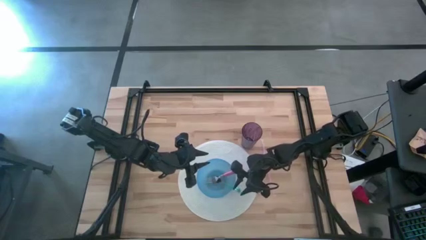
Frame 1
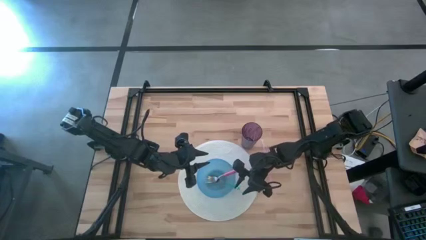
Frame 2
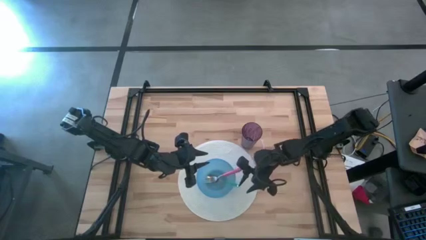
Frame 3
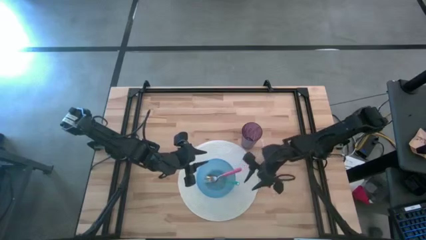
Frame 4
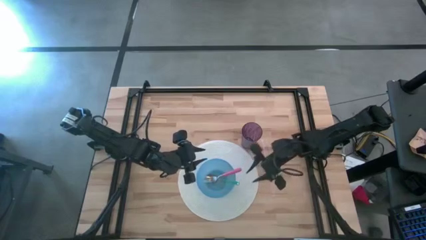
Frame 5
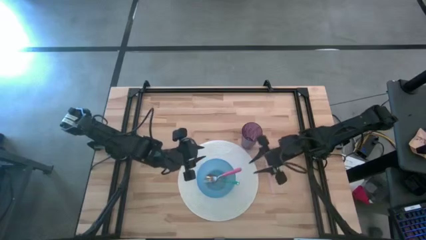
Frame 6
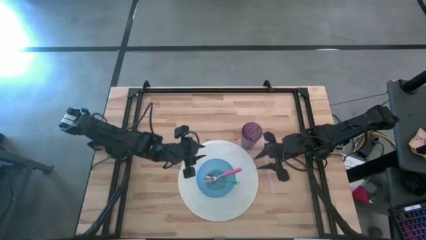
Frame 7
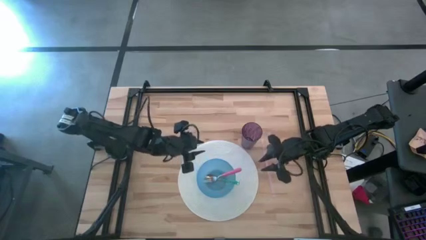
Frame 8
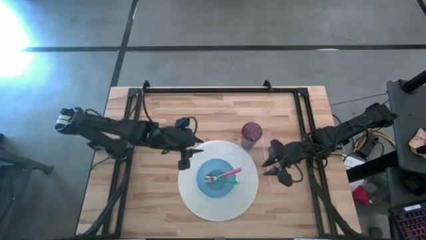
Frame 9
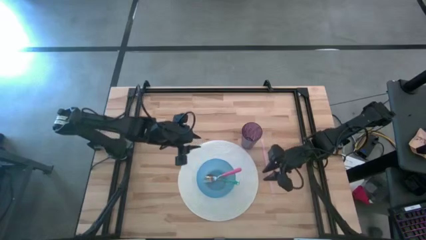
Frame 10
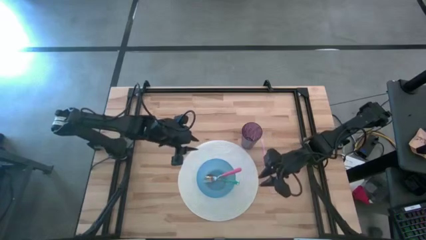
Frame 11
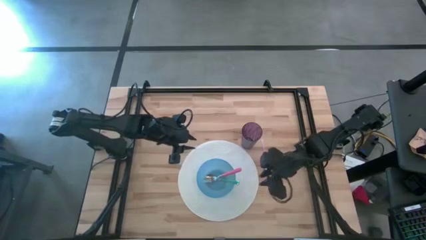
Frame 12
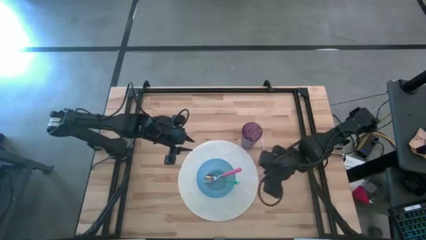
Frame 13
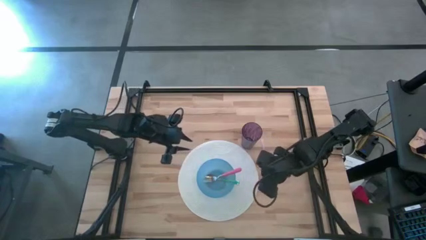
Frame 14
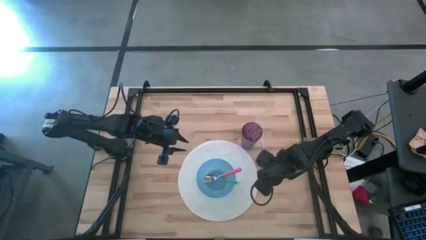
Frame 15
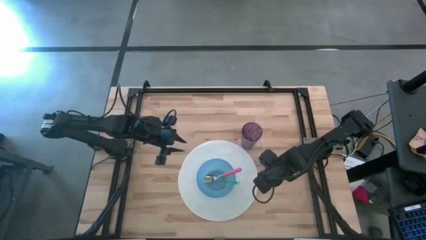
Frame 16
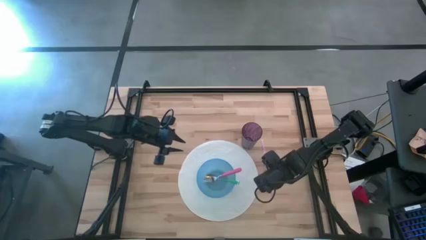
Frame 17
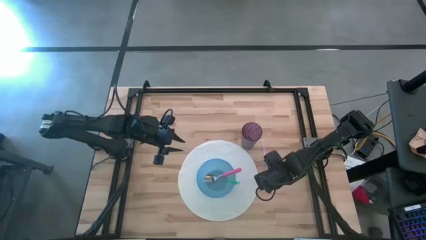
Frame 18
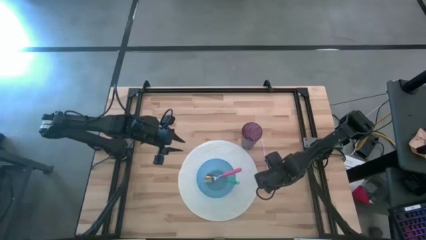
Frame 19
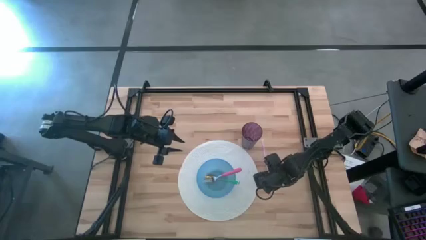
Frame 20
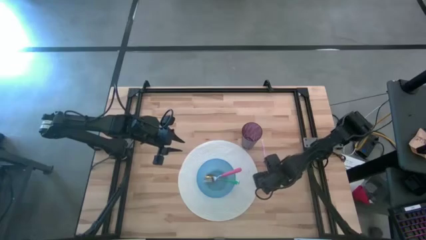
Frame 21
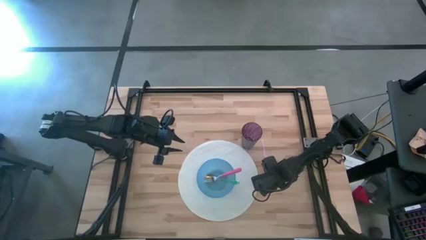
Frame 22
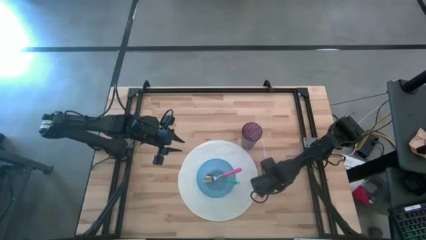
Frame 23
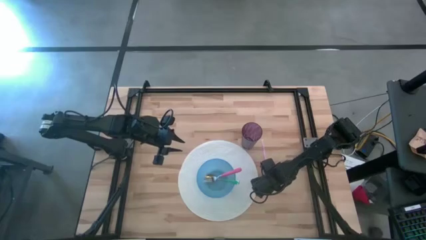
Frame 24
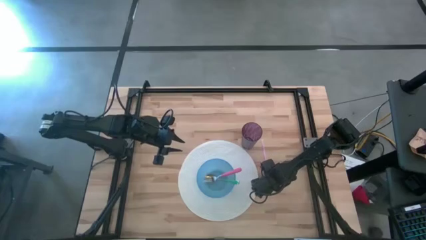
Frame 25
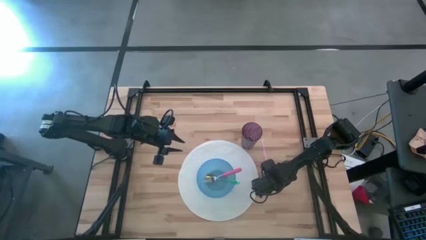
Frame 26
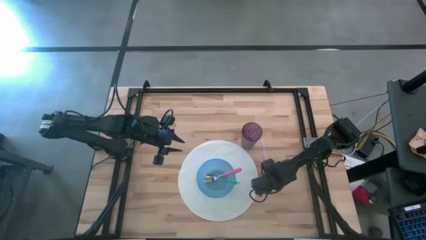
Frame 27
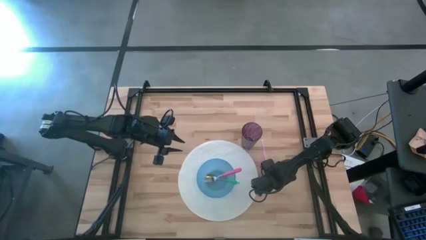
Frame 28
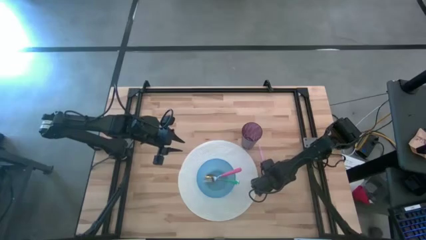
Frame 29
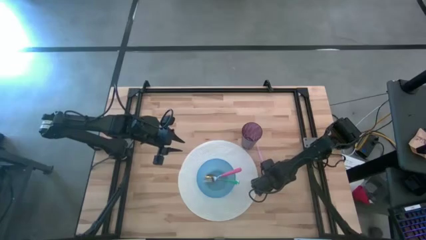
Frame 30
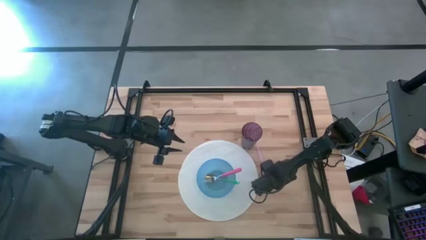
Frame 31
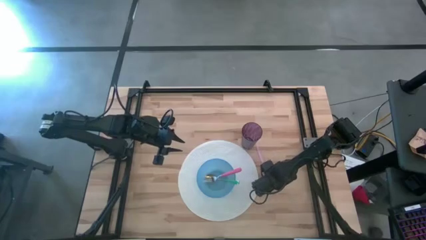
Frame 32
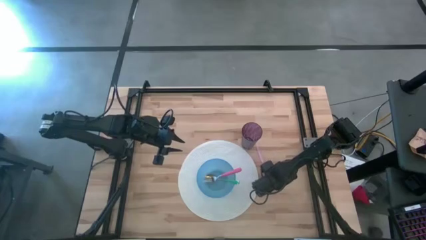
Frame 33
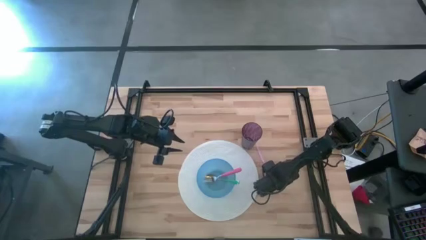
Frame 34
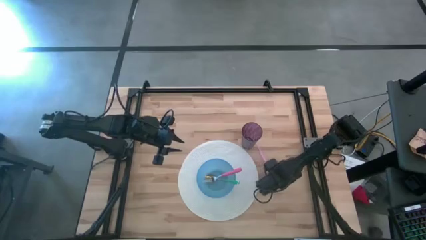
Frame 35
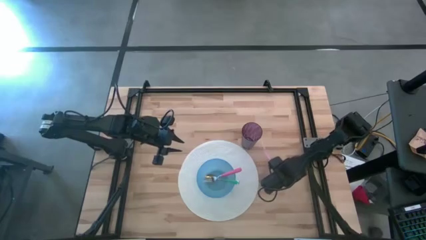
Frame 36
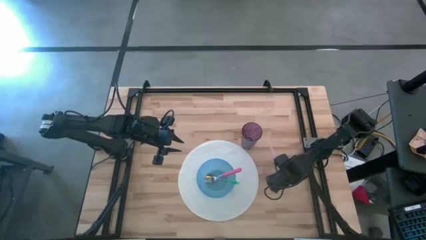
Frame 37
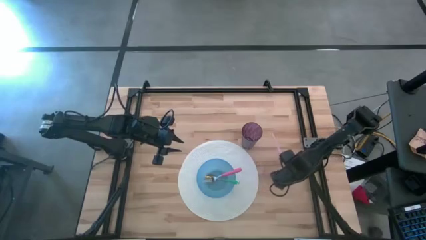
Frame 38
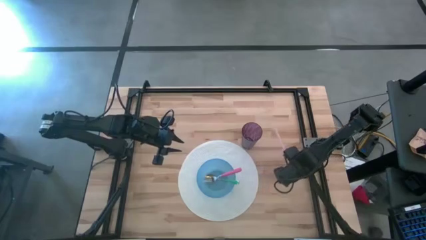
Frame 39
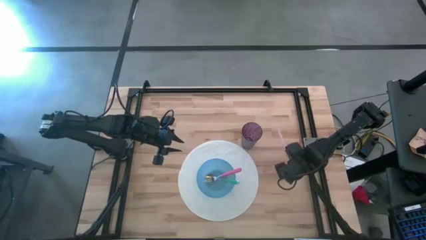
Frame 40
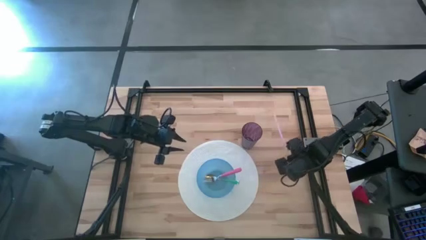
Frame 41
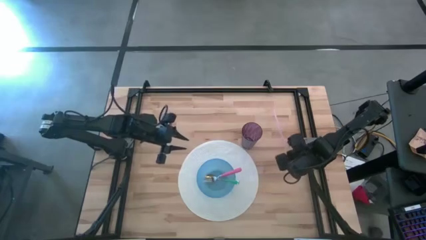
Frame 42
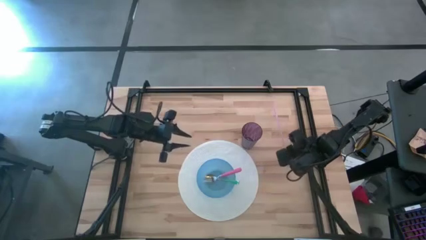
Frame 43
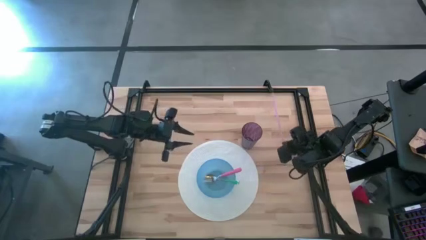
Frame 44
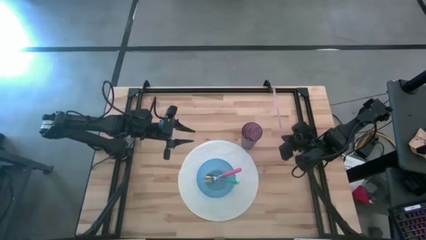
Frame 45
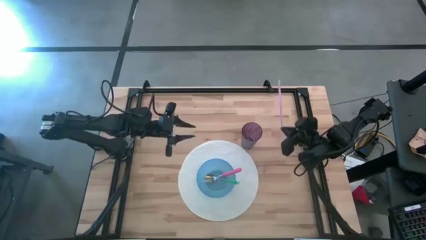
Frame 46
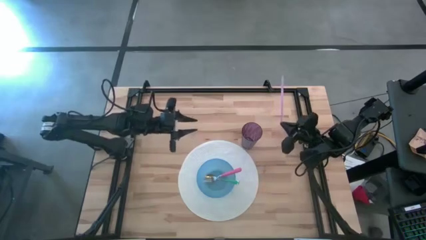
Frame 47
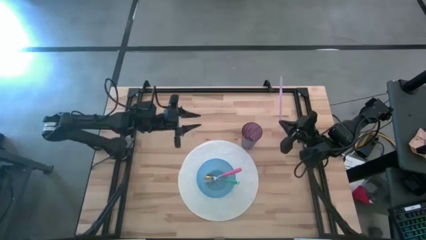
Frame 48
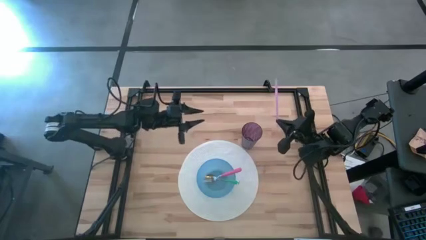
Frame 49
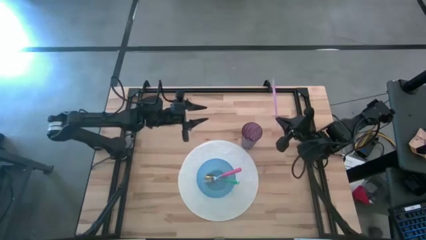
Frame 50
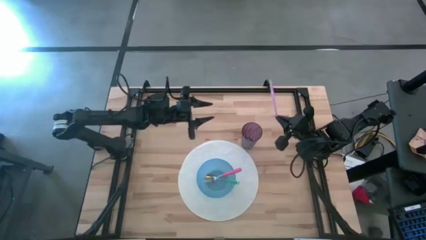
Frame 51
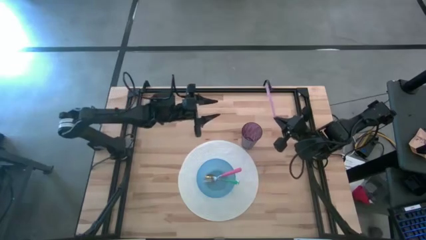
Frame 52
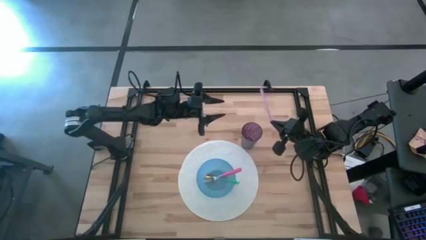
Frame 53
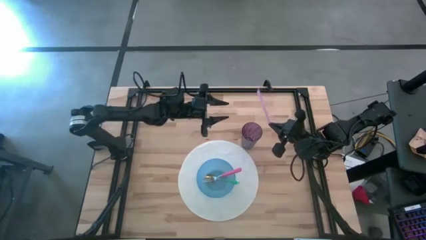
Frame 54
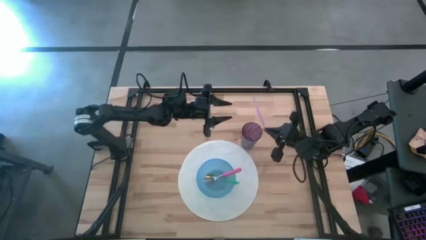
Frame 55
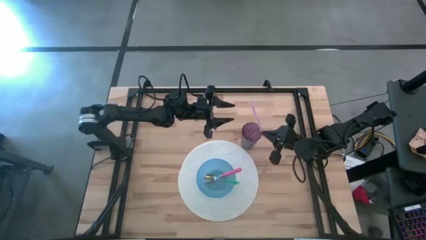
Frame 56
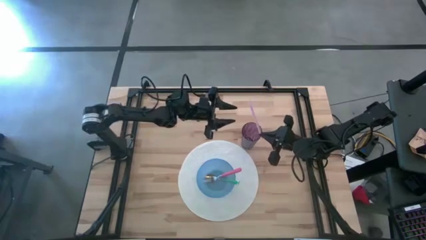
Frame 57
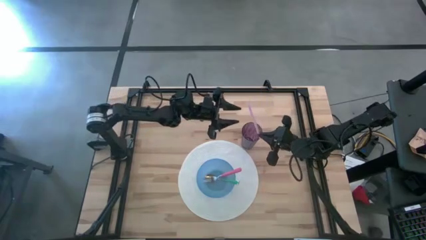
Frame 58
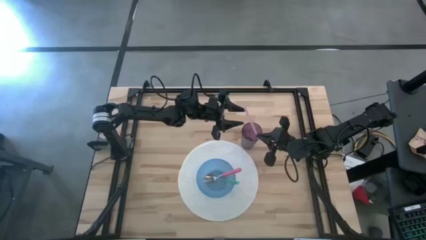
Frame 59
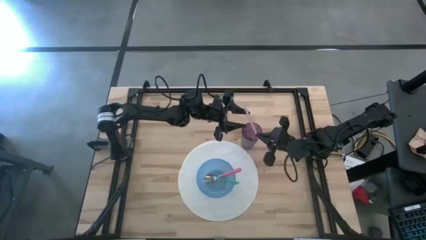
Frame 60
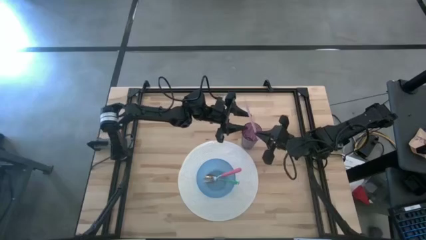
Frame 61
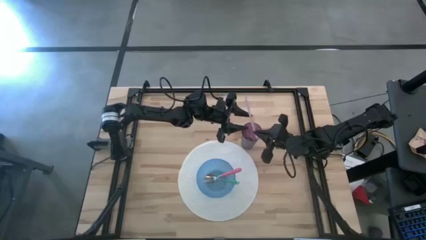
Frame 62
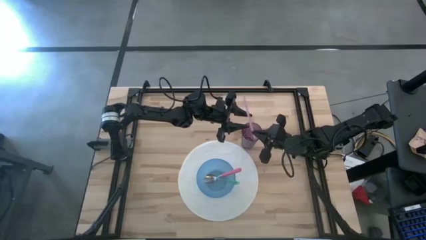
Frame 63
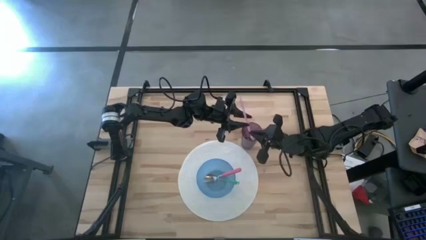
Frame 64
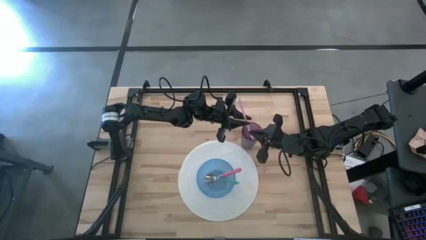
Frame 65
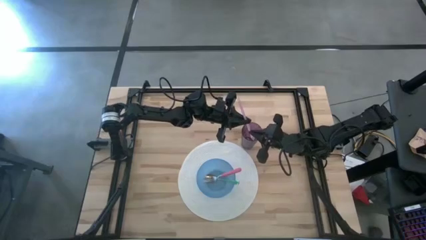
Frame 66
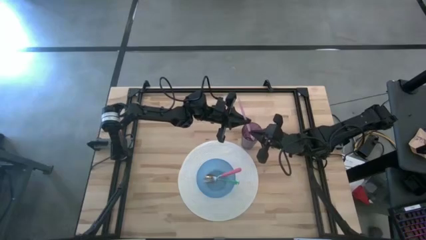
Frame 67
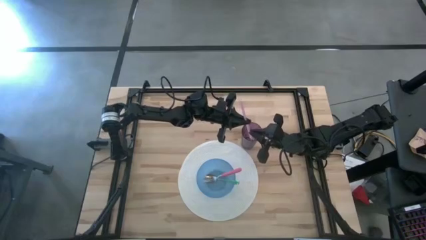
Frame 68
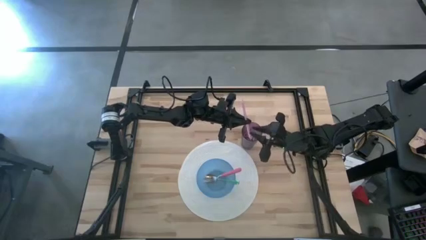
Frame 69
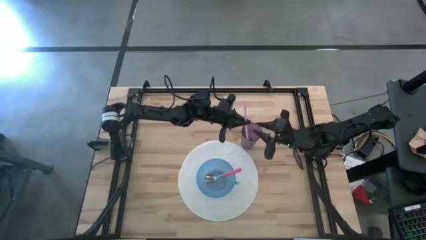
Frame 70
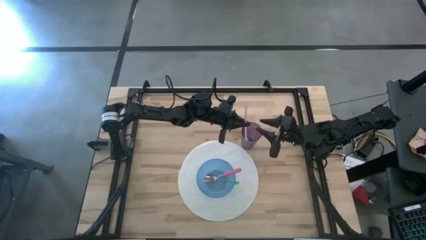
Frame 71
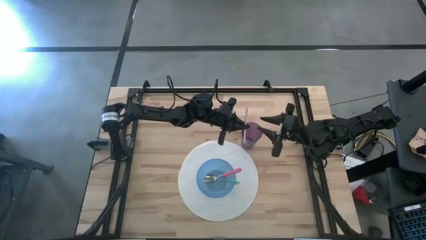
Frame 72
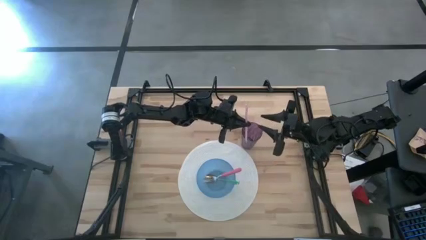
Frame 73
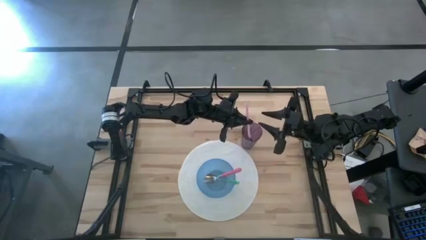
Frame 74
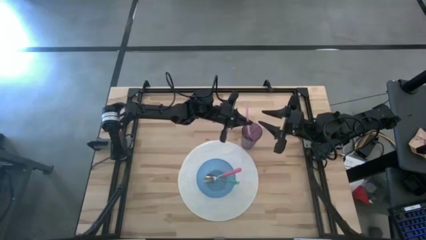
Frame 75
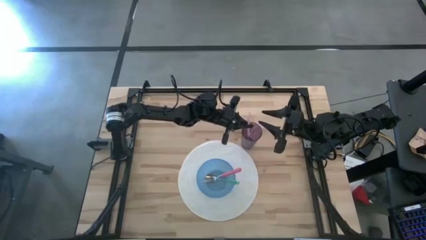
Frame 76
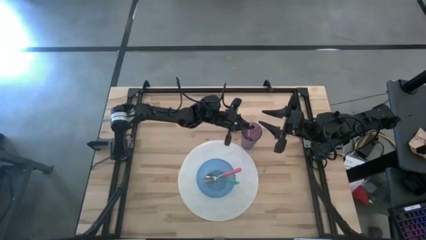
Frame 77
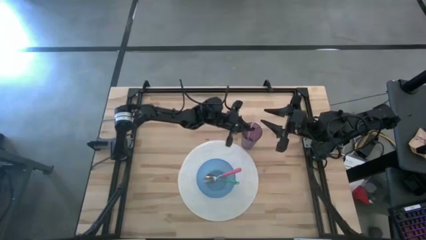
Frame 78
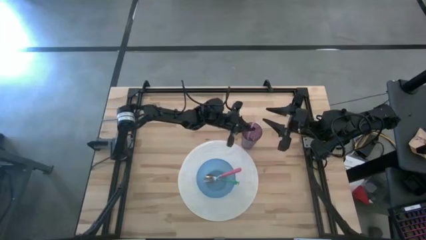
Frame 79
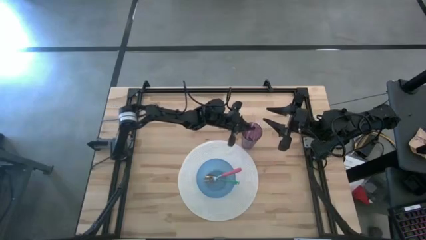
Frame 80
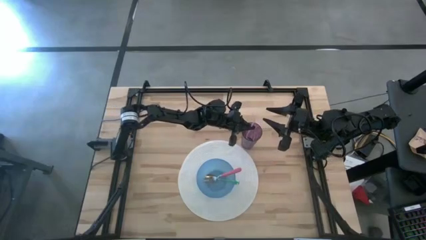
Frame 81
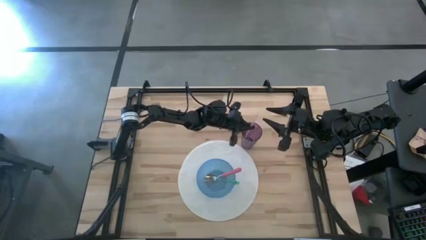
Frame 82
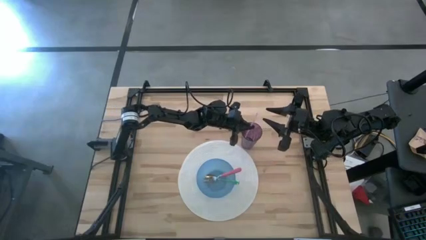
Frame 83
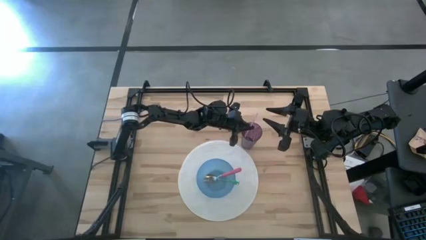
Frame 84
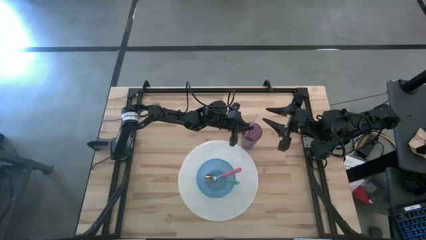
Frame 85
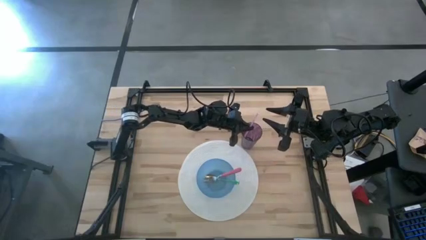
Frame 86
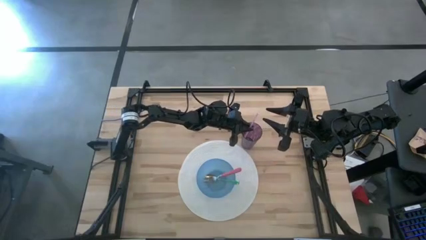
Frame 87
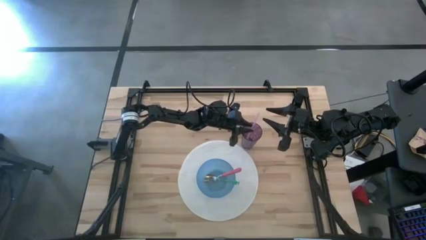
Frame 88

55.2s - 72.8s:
Task: Pick & Place Utensil
Put the purple straw into the purple cup
